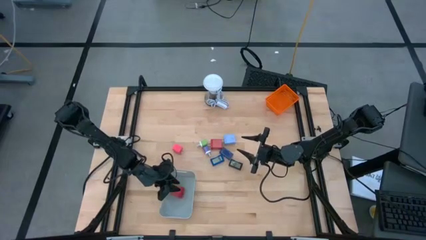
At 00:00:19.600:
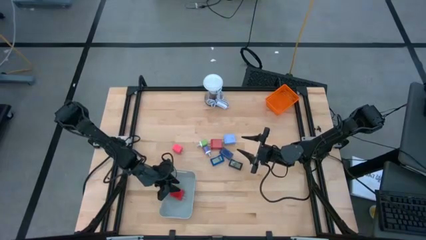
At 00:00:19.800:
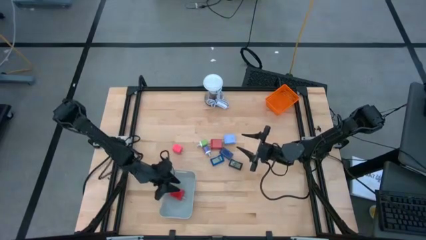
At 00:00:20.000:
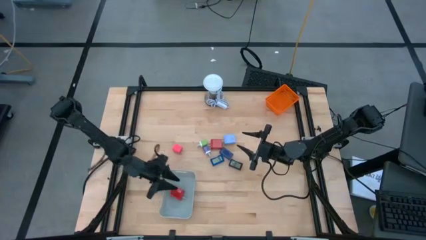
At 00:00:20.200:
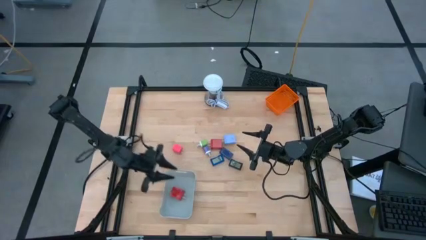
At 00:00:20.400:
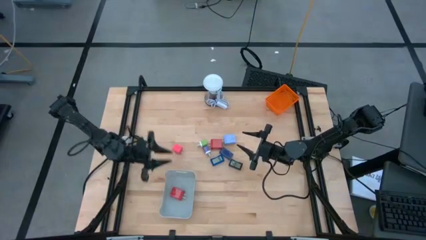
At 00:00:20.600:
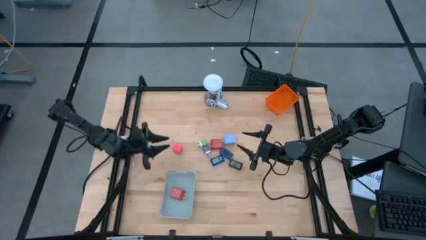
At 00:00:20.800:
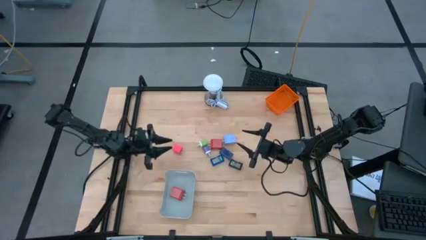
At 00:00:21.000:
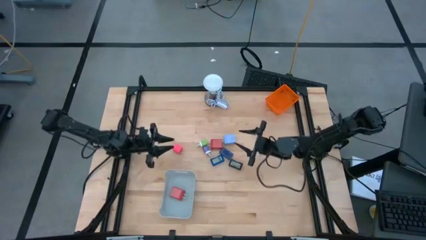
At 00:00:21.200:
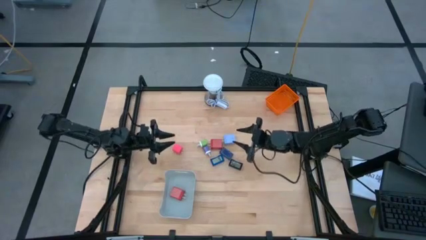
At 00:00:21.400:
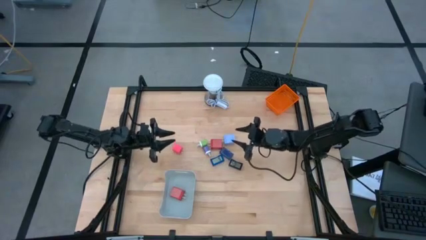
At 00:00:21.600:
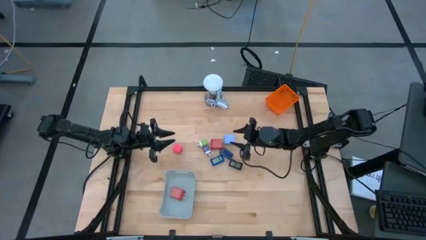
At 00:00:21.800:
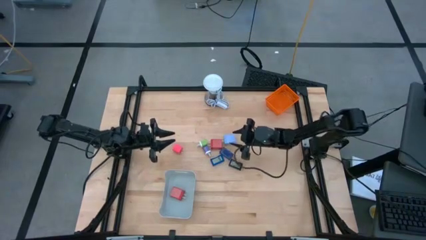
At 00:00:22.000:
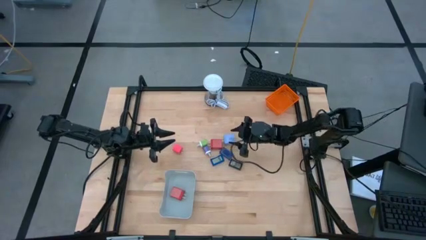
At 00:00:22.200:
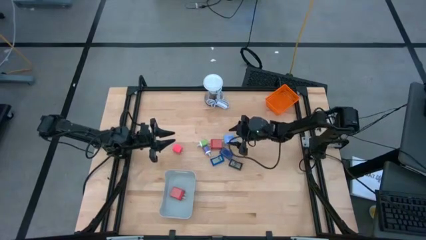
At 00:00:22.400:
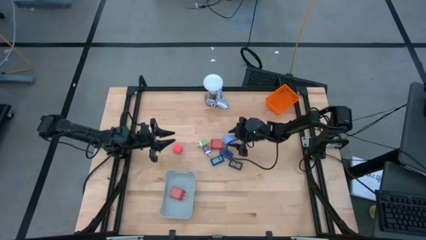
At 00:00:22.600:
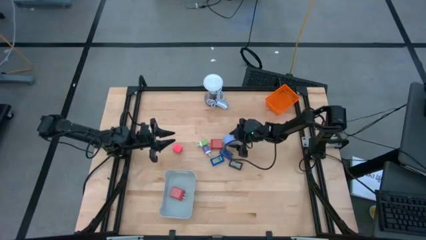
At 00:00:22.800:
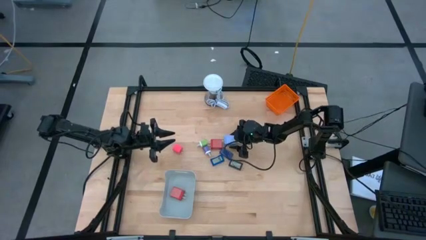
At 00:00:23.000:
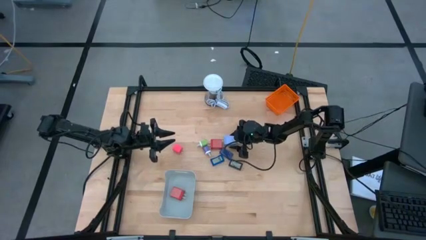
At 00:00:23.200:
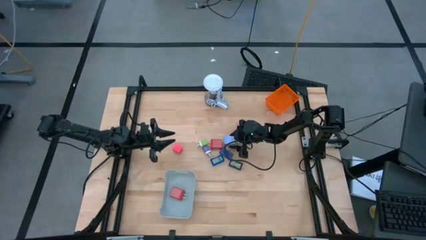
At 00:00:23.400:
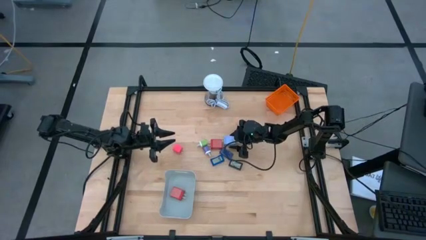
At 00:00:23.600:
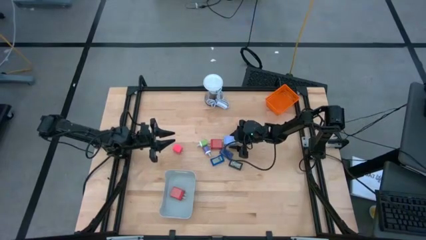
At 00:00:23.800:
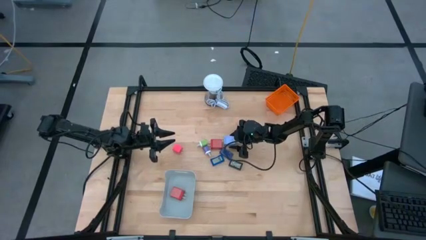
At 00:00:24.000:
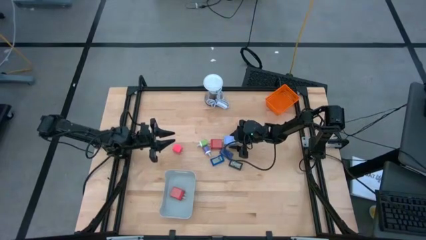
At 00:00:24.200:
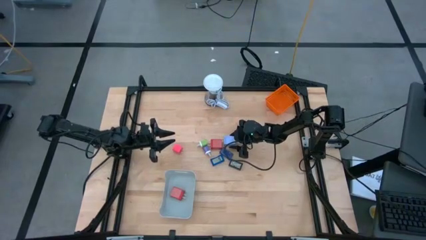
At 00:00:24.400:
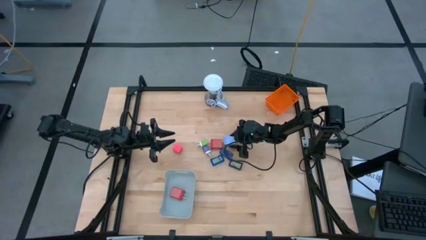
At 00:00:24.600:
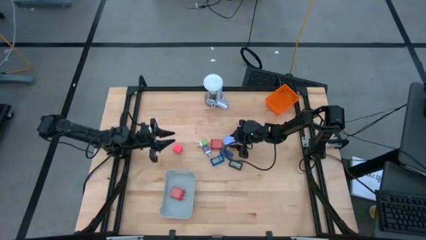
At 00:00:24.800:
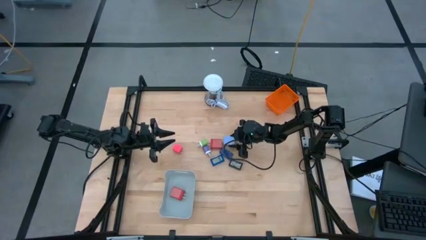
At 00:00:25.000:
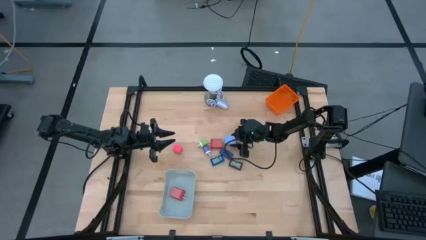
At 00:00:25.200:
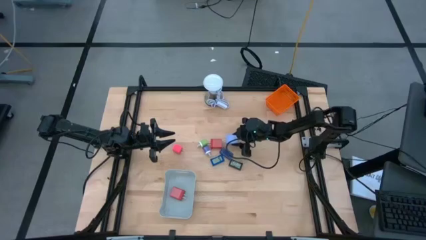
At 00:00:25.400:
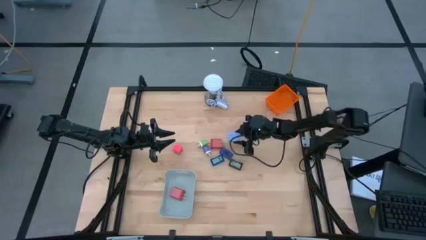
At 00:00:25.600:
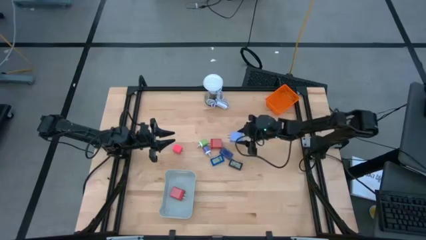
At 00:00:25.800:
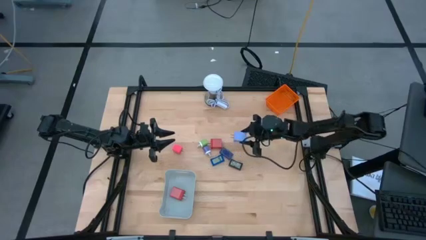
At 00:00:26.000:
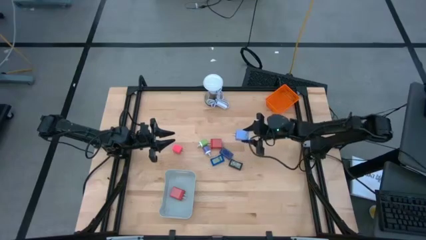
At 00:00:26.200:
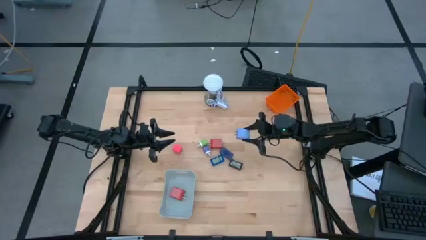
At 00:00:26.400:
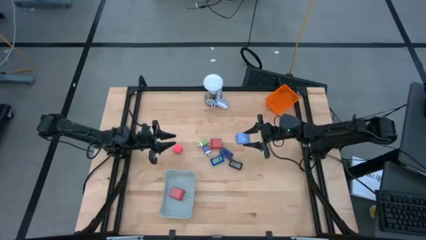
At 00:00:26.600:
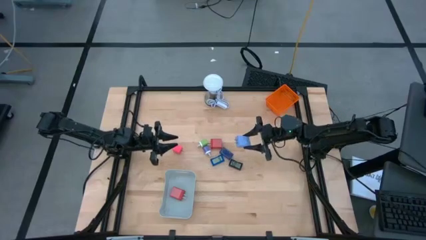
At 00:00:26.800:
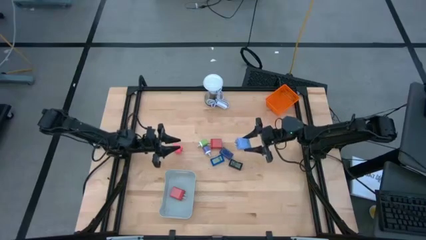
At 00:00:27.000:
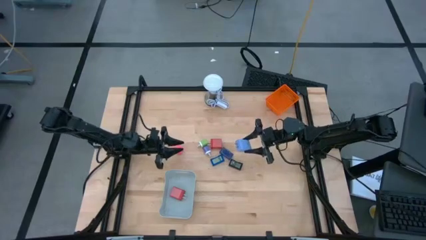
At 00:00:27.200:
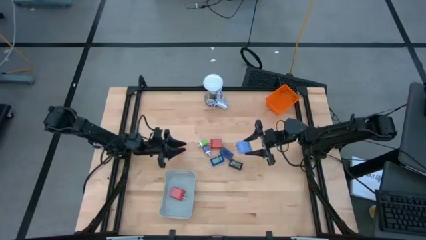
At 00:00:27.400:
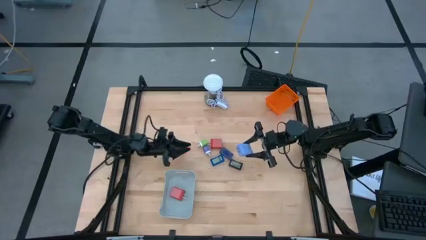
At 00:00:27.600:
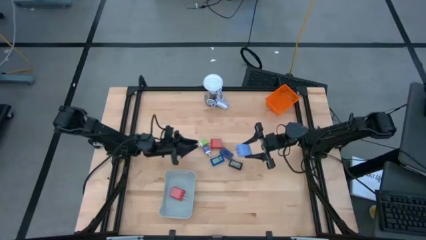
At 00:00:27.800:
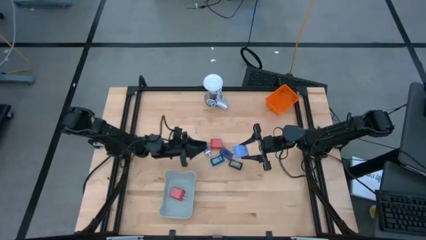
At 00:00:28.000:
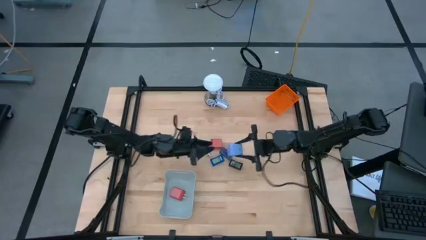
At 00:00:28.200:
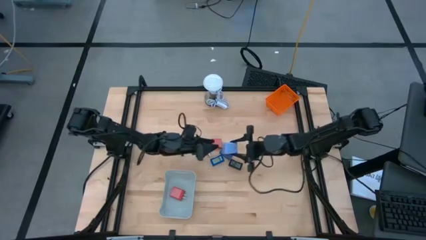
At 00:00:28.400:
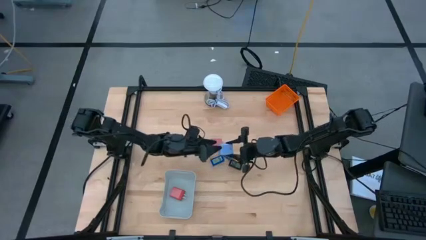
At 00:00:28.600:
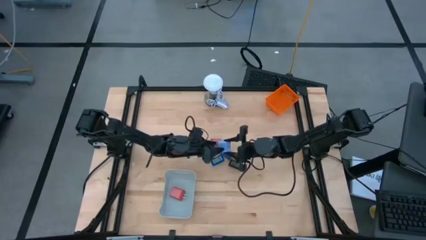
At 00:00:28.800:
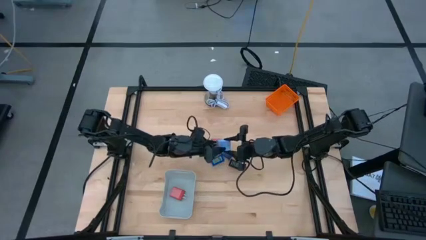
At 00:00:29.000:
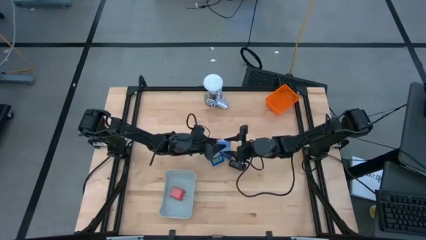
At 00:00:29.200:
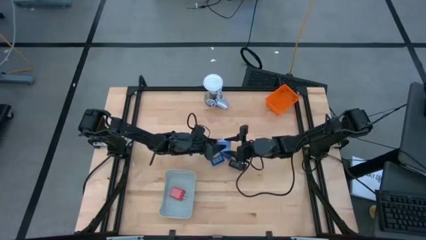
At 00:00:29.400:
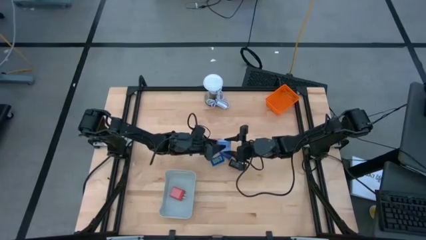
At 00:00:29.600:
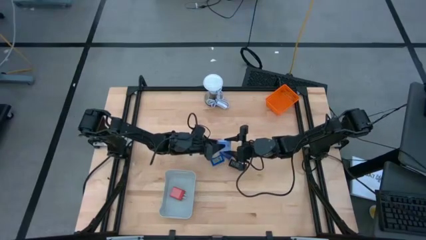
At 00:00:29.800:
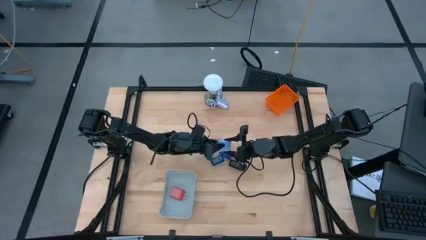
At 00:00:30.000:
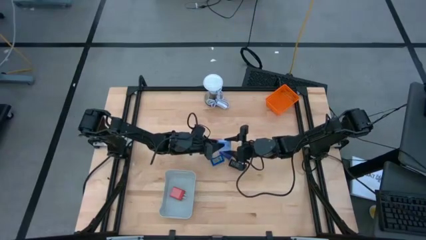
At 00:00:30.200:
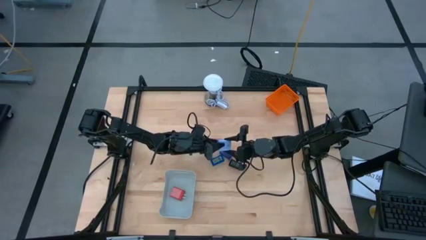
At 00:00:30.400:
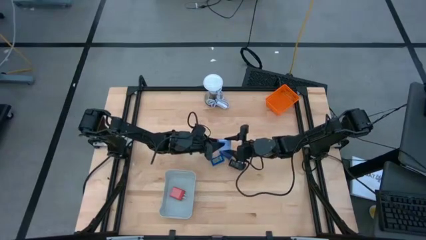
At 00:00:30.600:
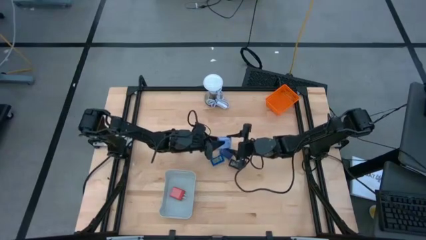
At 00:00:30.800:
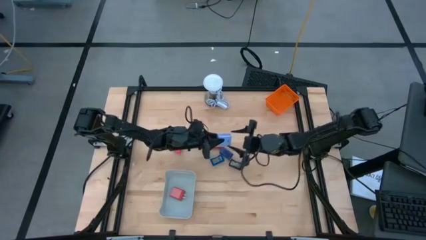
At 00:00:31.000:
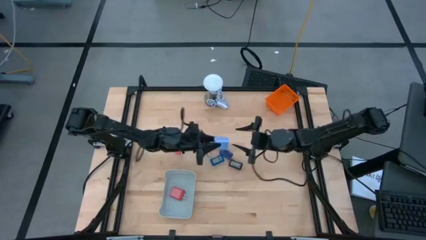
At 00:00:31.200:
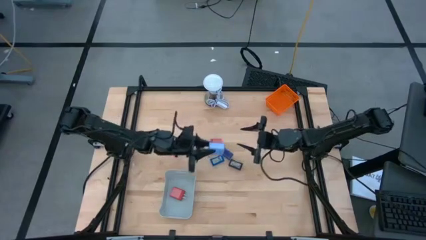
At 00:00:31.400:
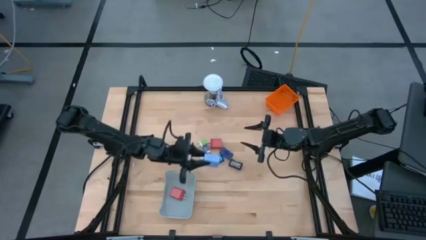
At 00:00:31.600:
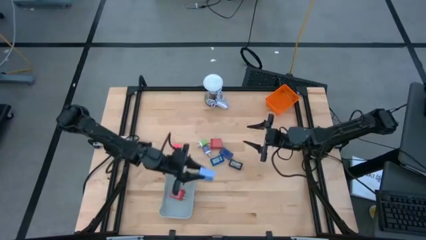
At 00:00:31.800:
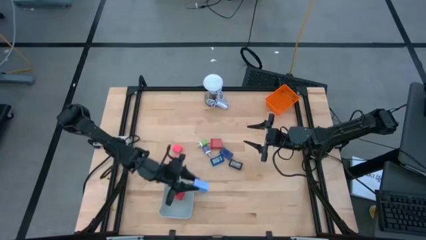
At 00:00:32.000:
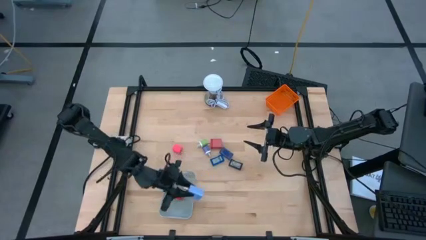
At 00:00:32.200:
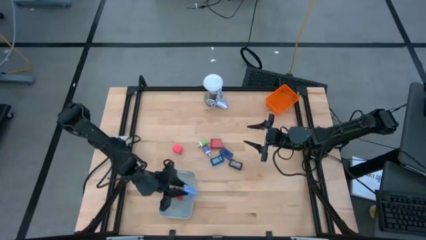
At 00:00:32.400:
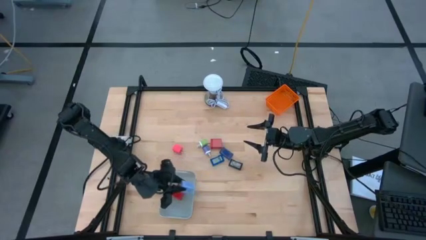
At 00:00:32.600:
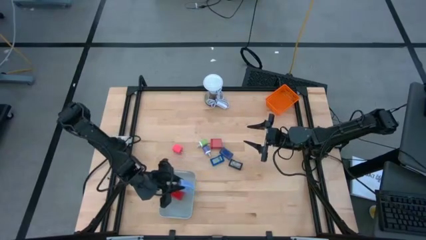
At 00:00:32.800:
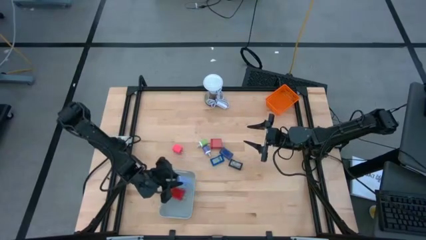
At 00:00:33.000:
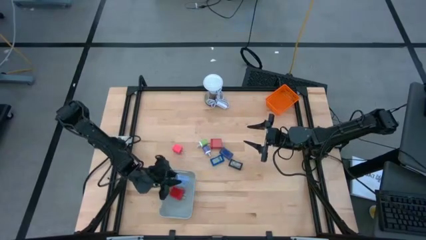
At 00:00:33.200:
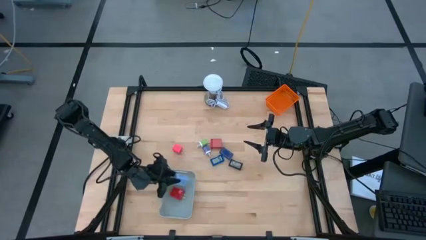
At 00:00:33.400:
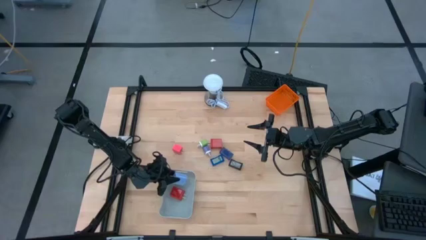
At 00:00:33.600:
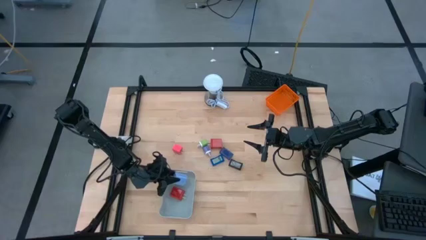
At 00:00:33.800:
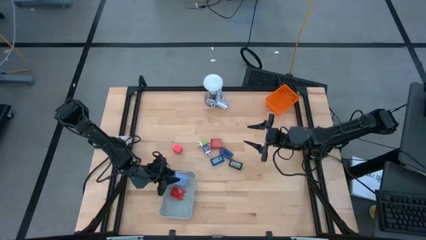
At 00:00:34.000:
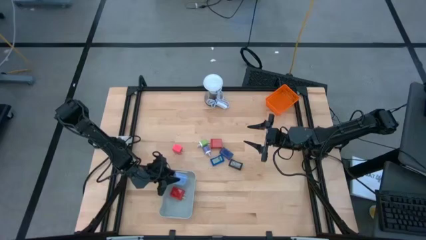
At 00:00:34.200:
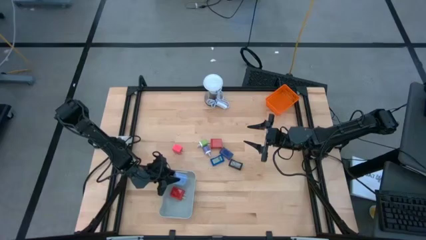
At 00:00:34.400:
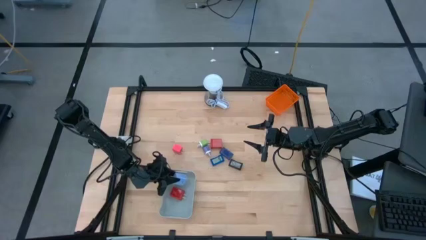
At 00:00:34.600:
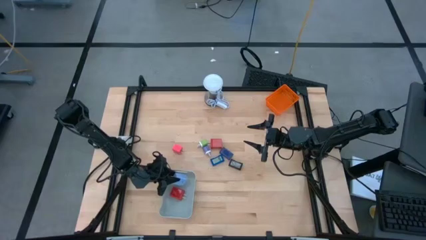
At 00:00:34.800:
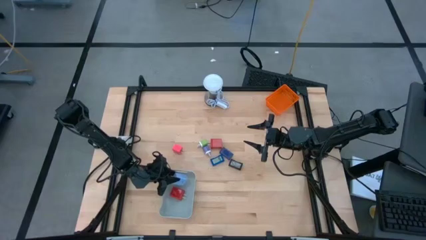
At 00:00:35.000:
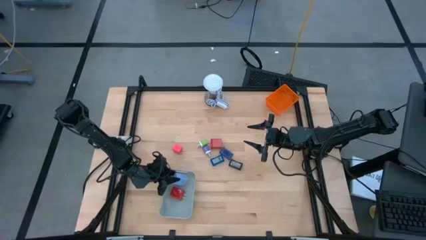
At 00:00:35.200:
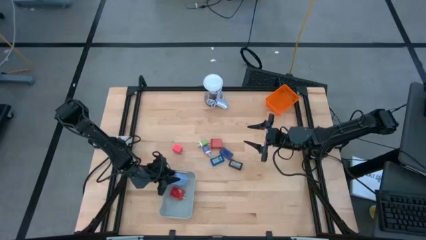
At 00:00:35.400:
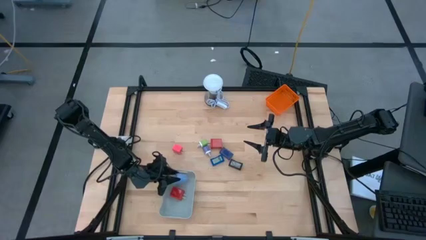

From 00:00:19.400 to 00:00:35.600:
Task: Pick & Place Office items
Put the light blue charger adapter into the gray bin
